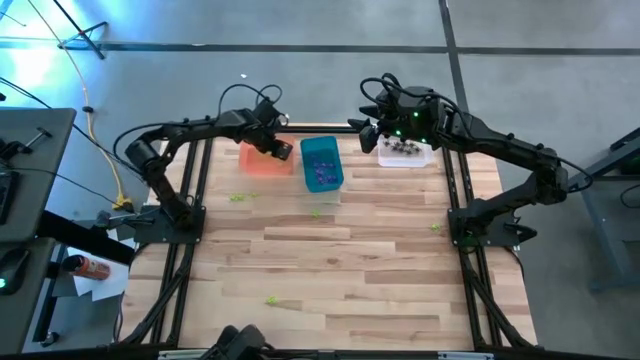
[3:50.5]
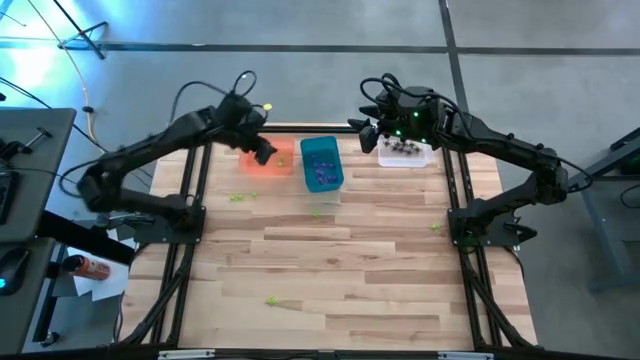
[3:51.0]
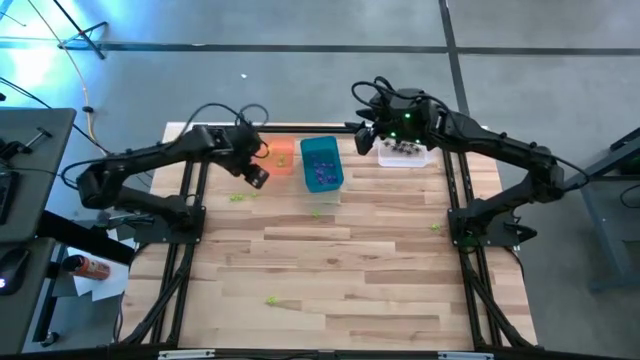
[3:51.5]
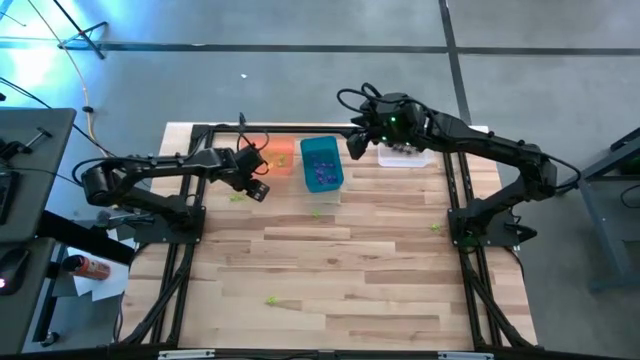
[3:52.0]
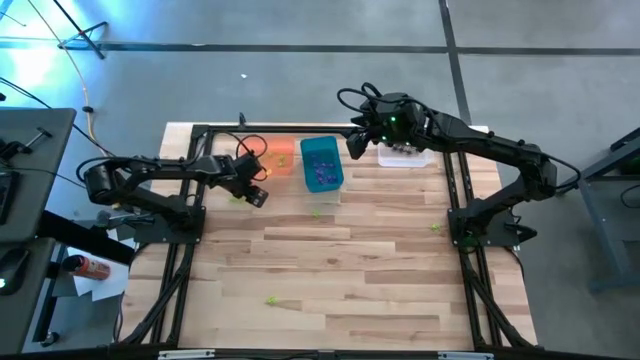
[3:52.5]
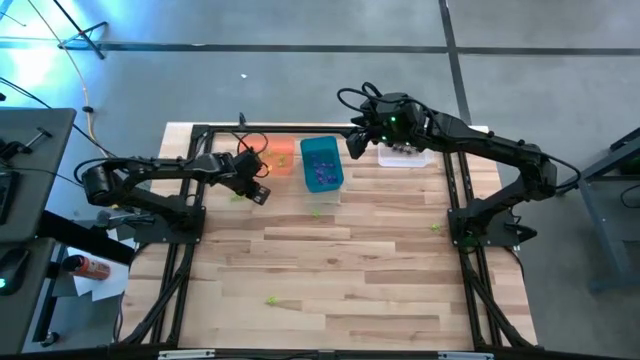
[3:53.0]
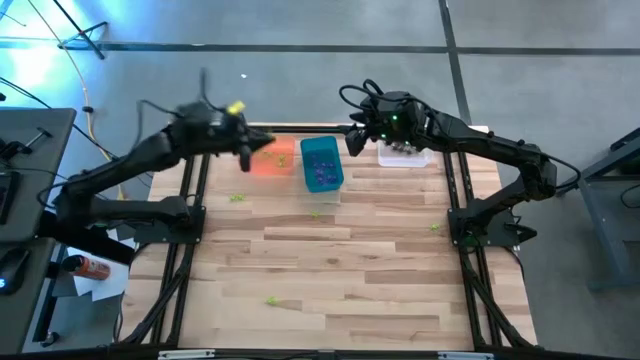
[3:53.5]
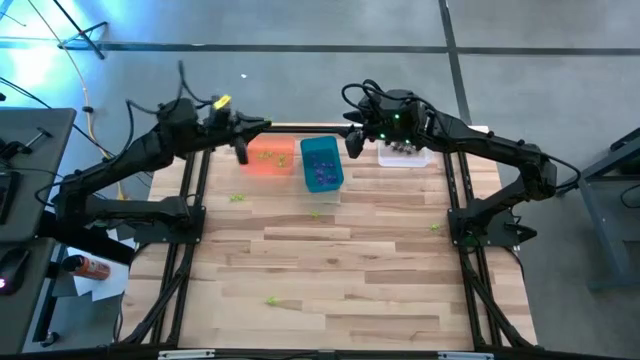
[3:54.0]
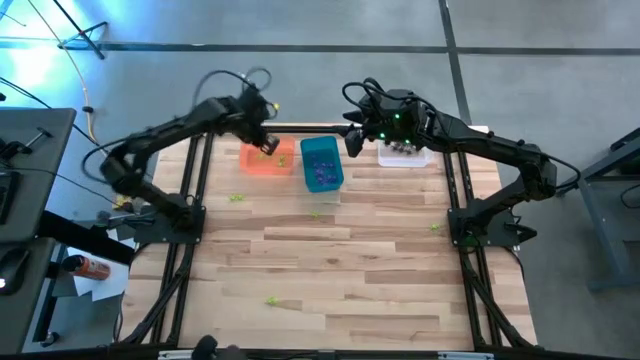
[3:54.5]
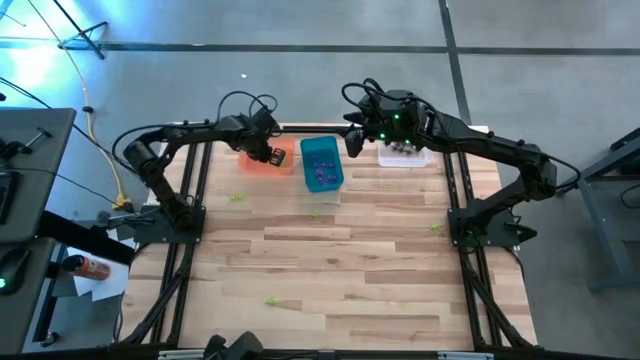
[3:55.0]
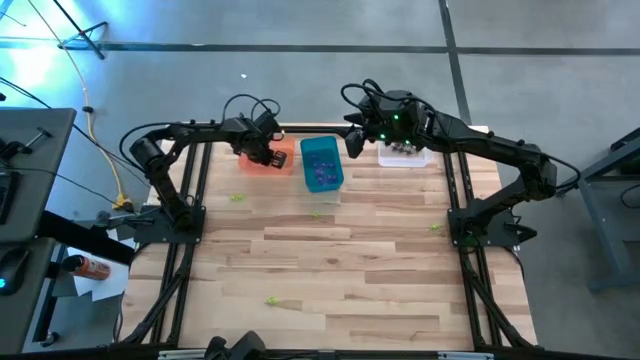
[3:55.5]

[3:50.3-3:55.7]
Task: Sort Halloween decoration
Put the green spider toy into the orange bin

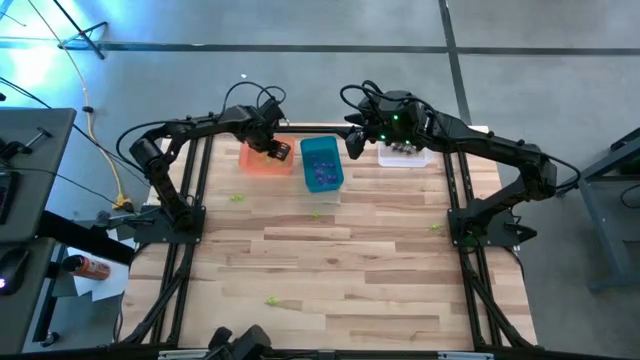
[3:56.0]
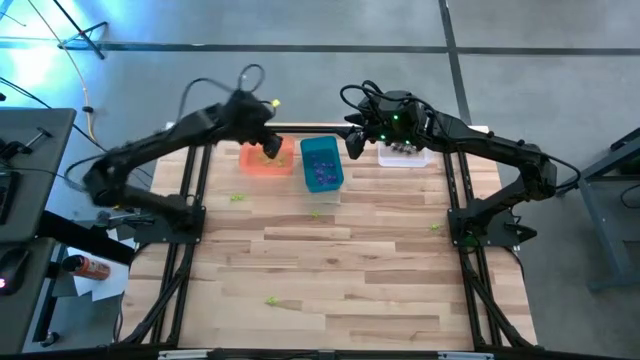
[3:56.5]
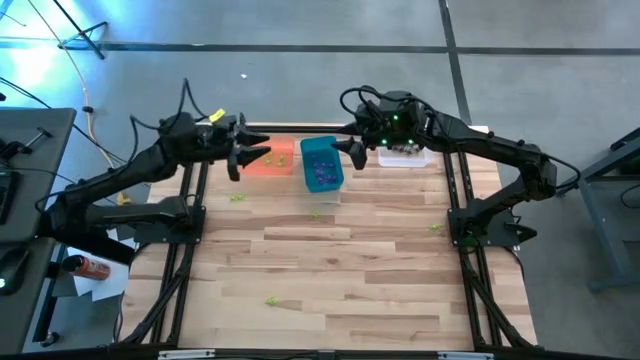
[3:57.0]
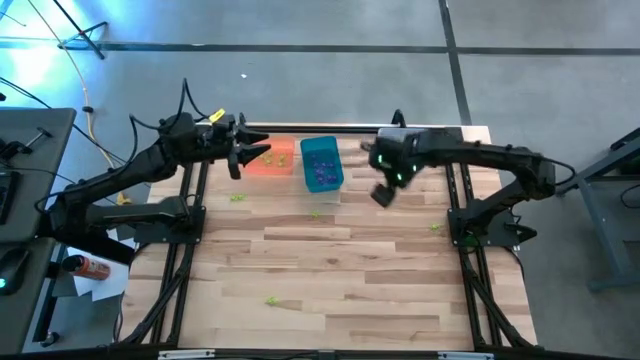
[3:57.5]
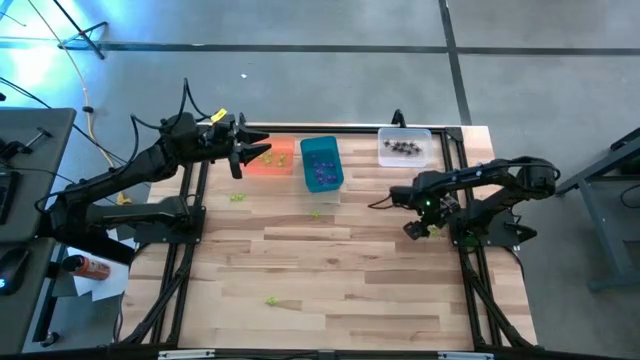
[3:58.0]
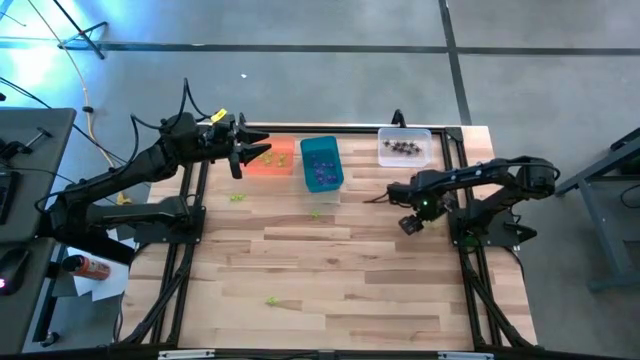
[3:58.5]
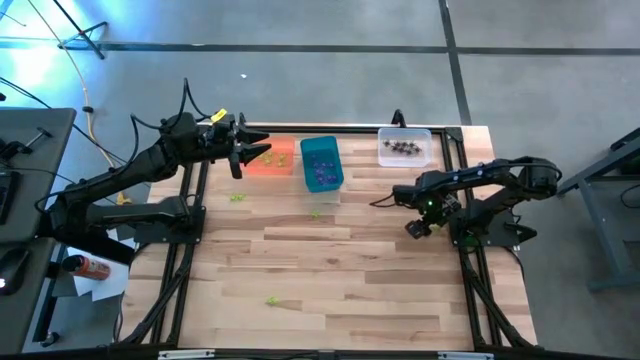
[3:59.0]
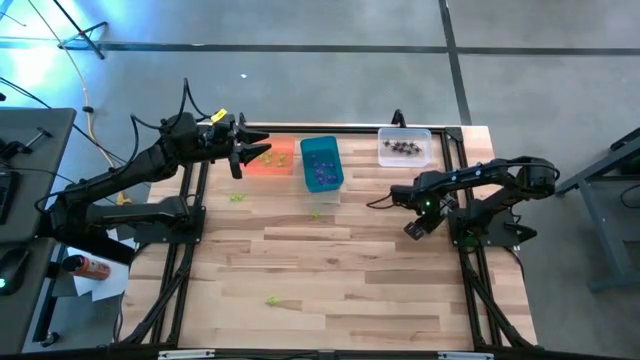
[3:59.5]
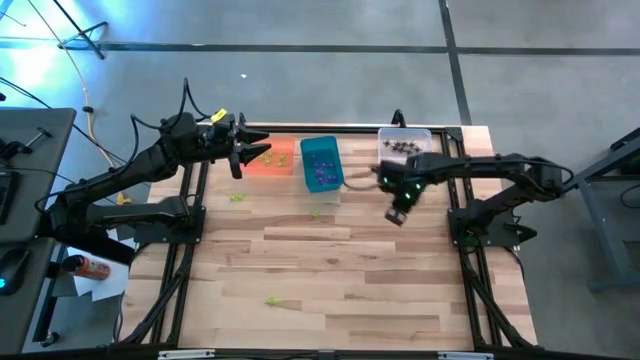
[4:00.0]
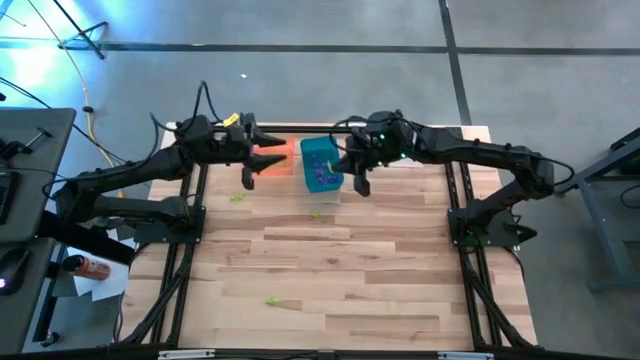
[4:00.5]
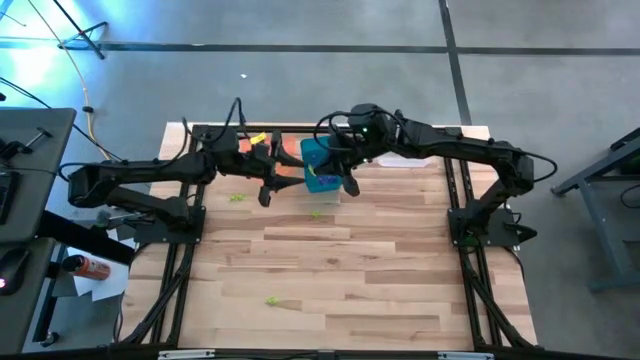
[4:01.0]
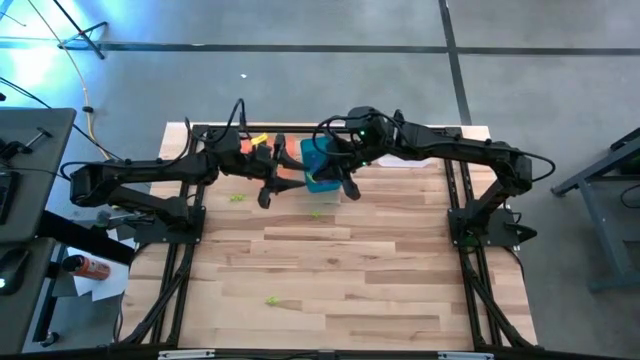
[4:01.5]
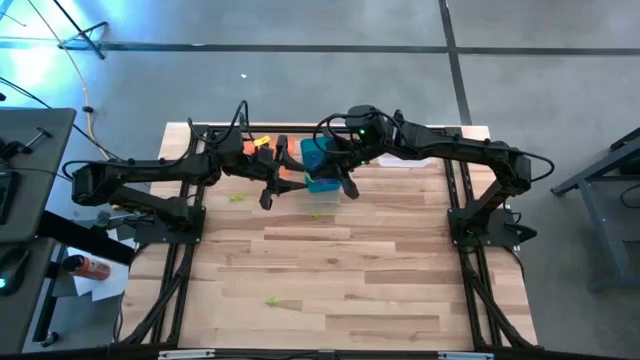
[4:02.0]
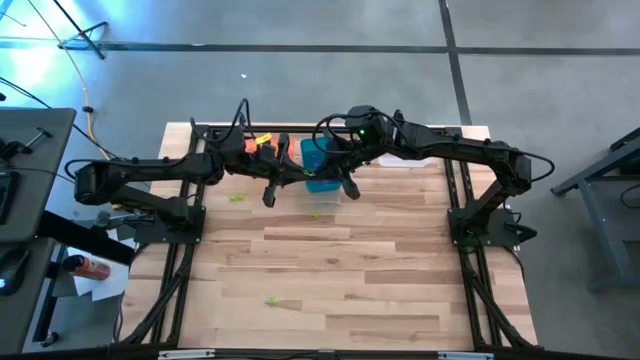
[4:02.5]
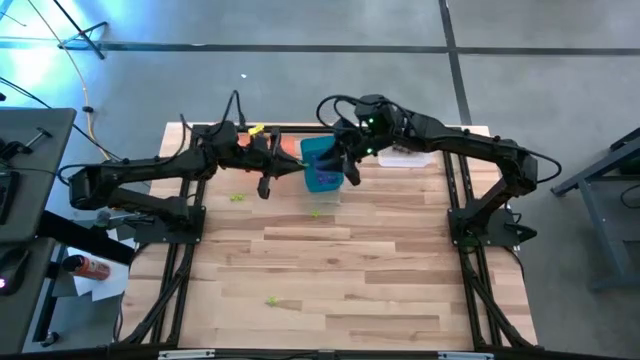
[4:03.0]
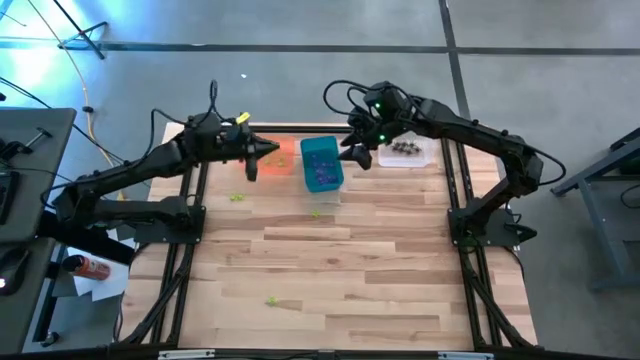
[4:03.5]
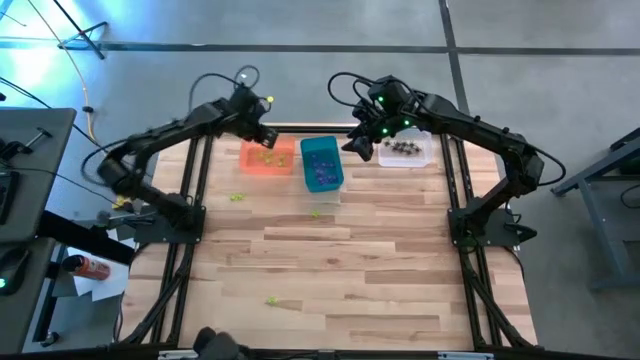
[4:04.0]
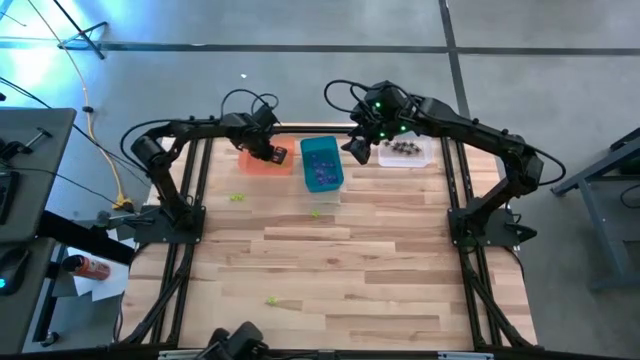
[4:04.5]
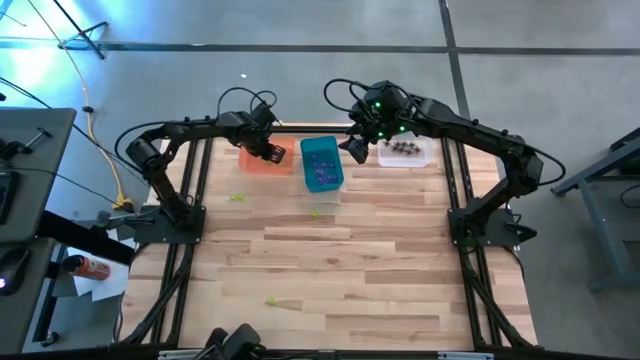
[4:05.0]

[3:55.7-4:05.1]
Put the green spider toy into the orange bin

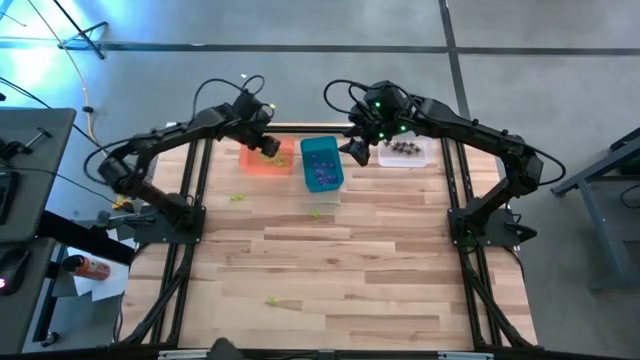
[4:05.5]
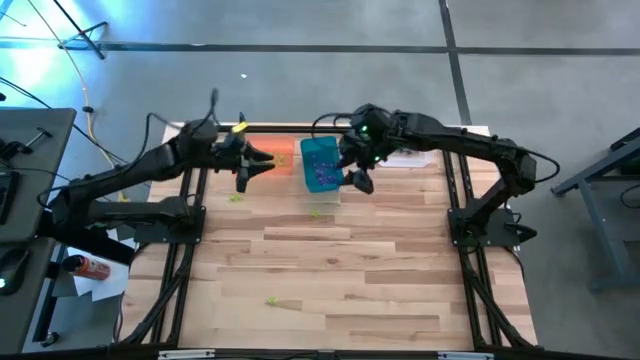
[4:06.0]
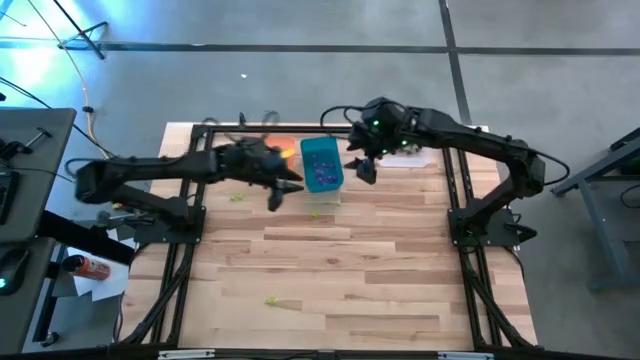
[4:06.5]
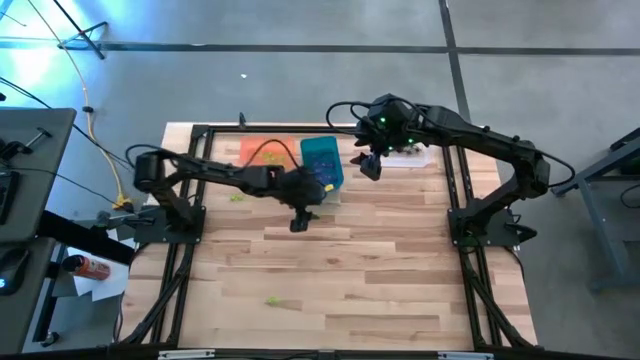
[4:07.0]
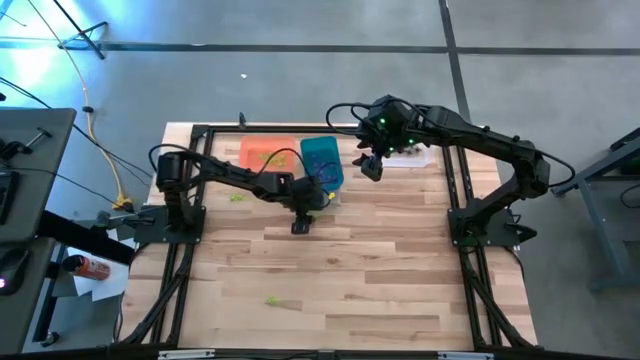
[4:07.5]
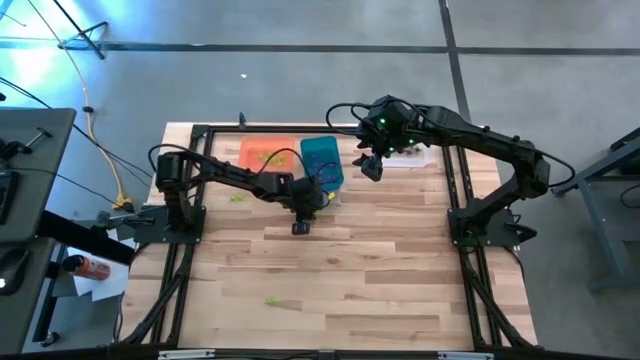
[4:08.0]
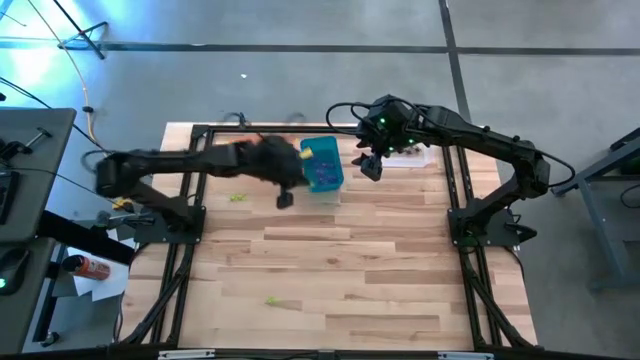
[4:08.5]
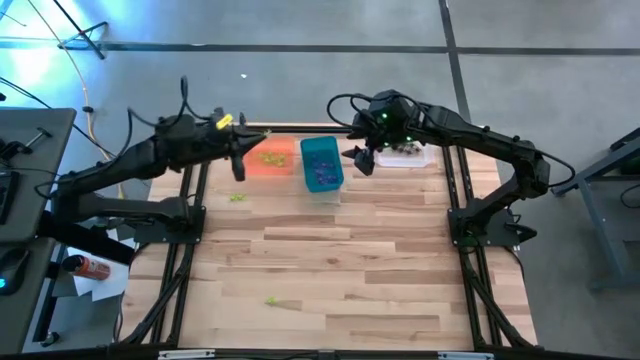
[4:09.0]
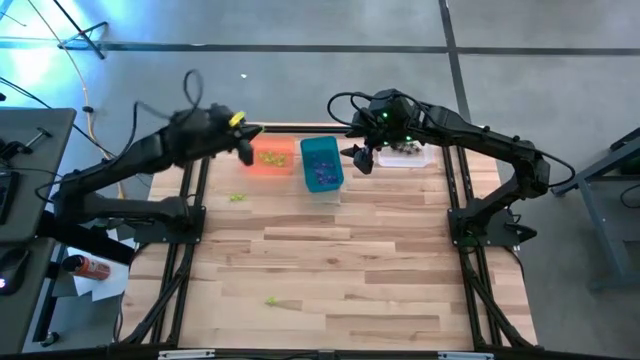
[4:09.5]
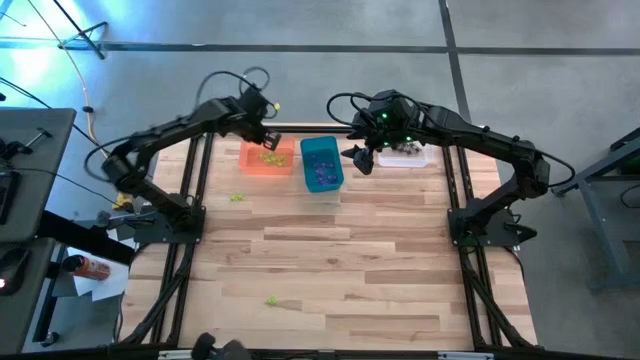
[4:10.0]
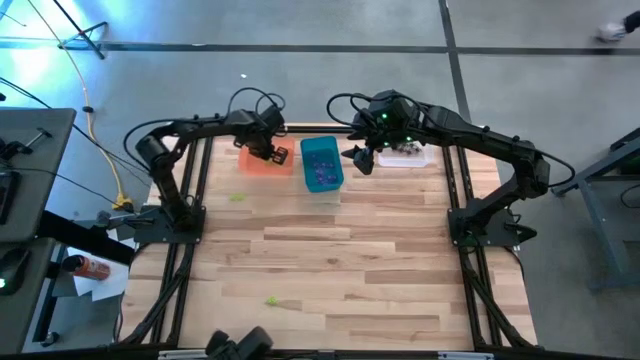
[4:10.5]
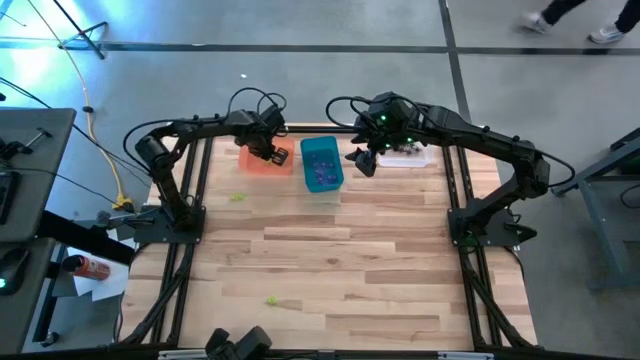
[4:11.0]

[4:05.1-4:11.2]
Put the green spider toy into the orange bin
